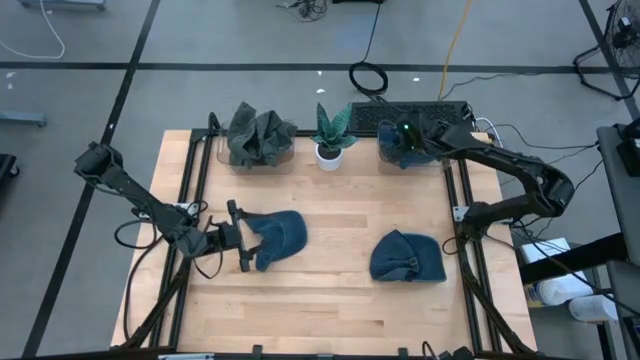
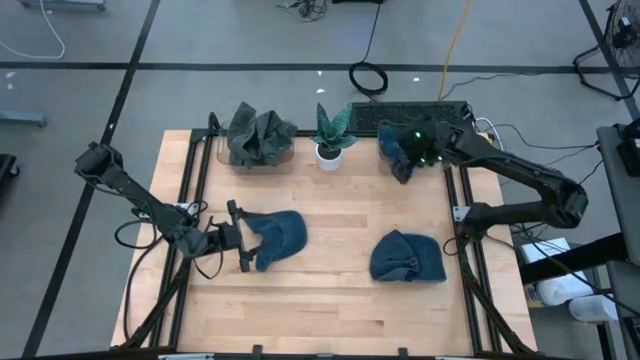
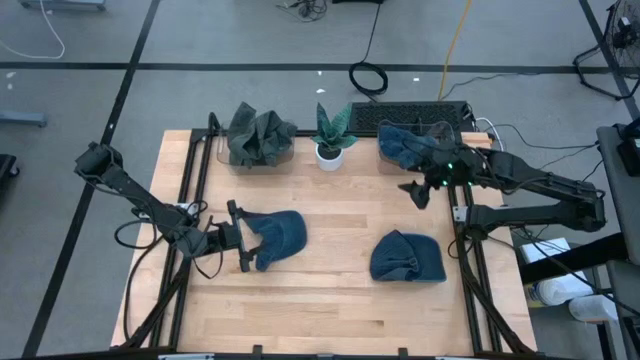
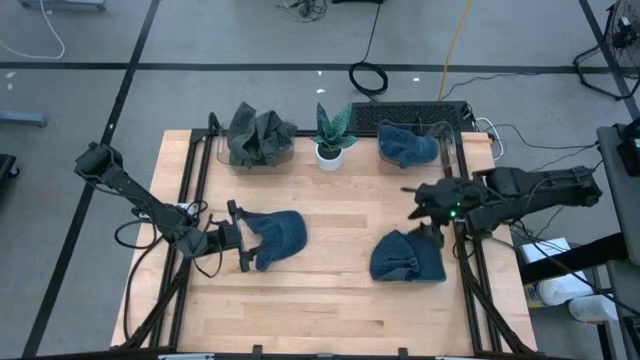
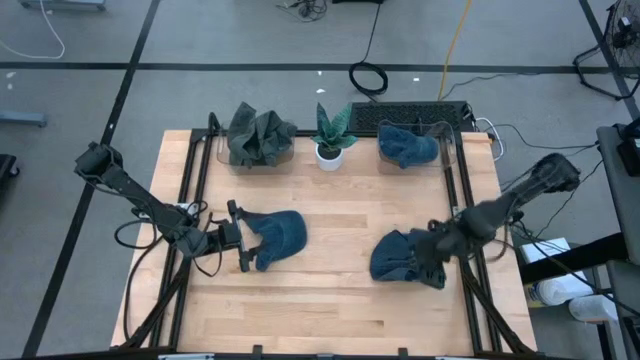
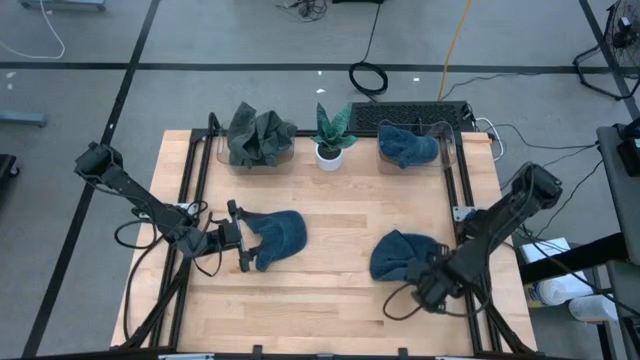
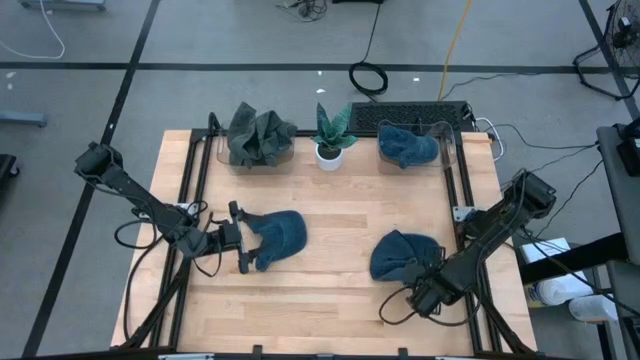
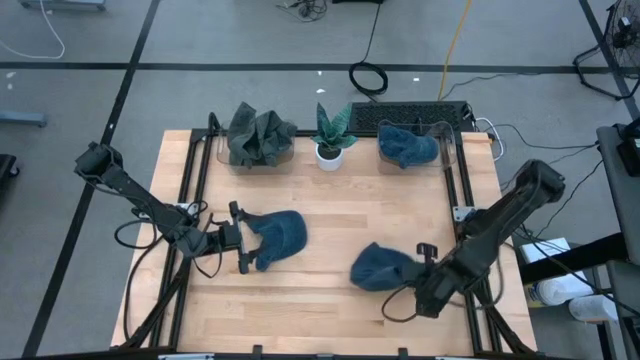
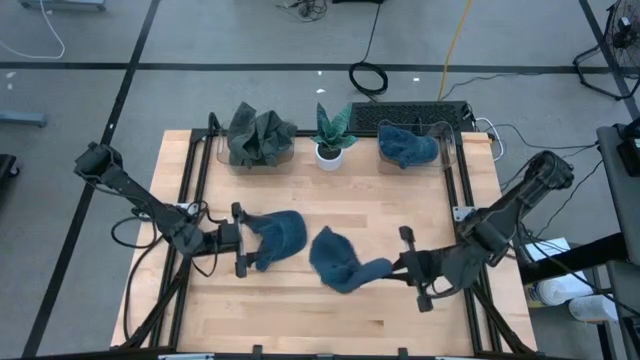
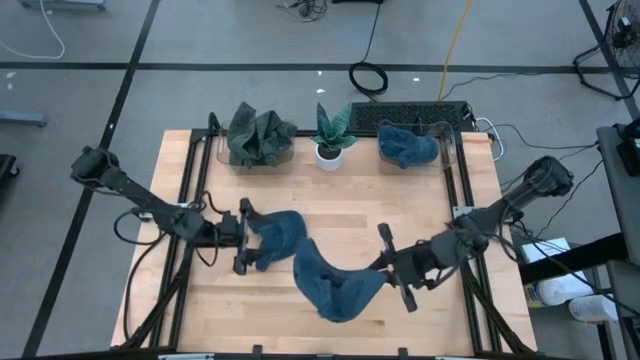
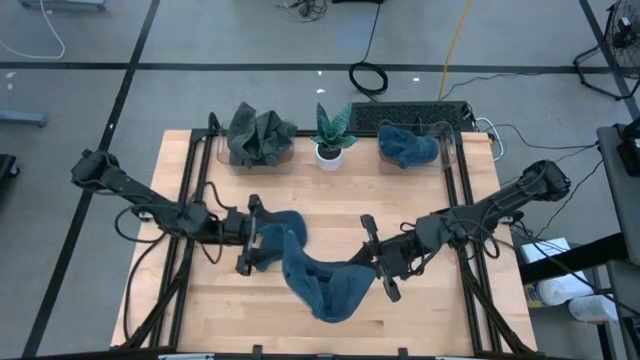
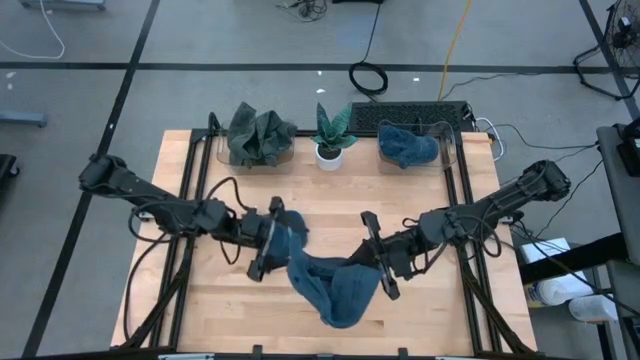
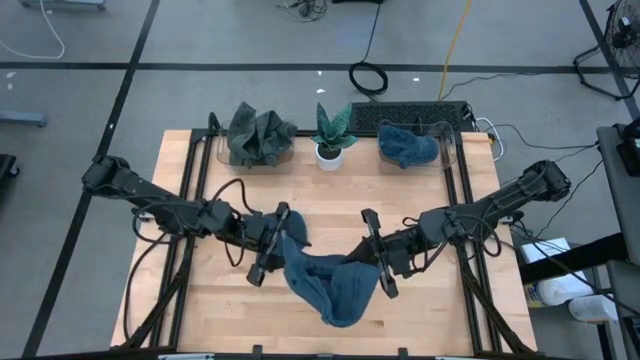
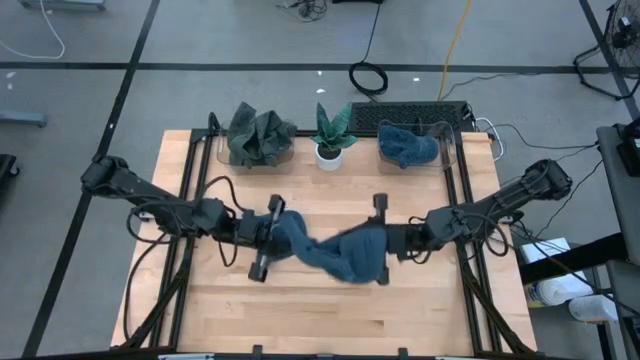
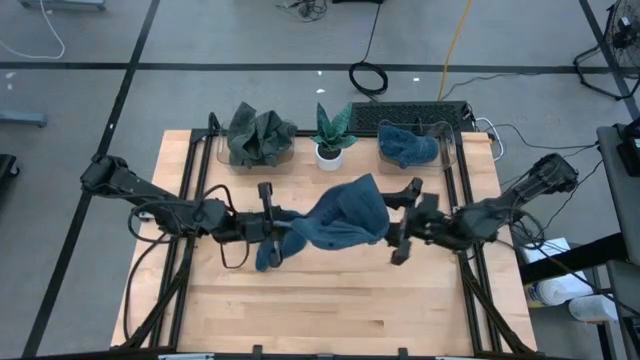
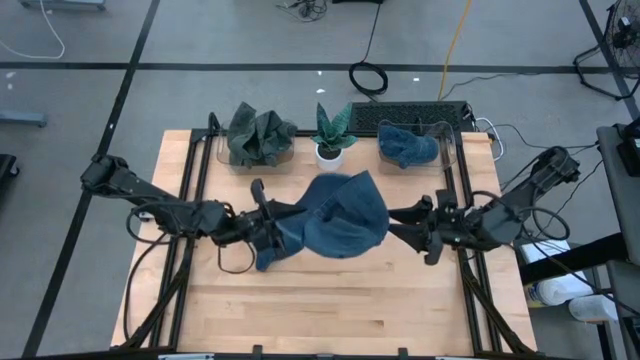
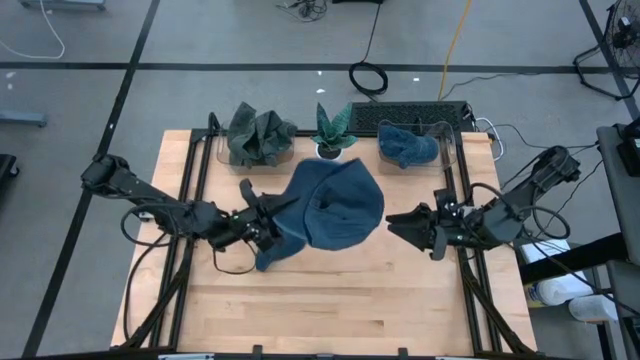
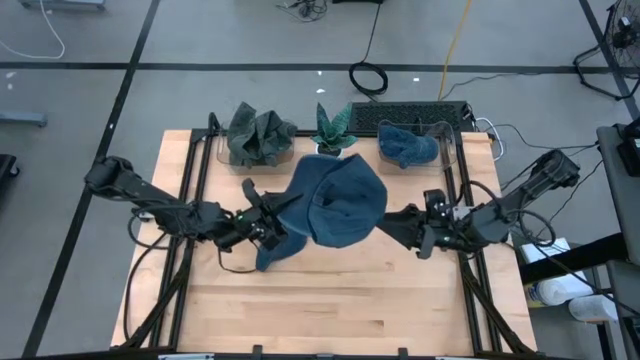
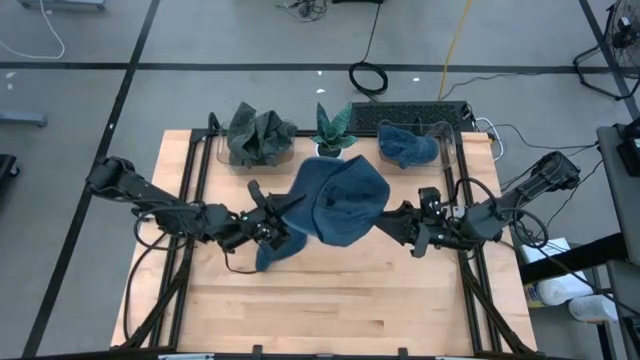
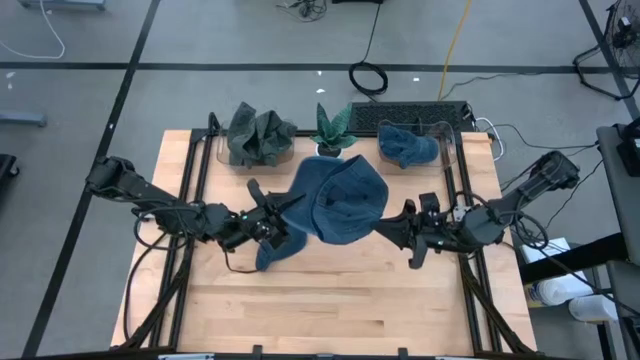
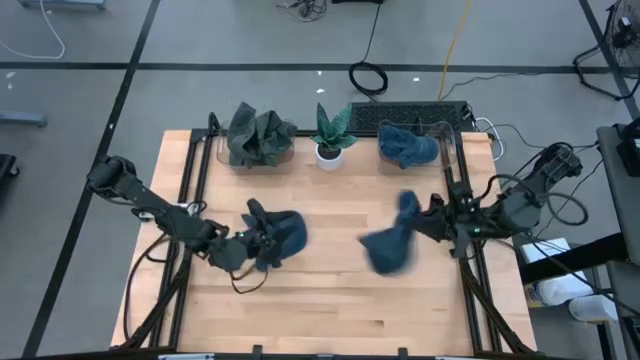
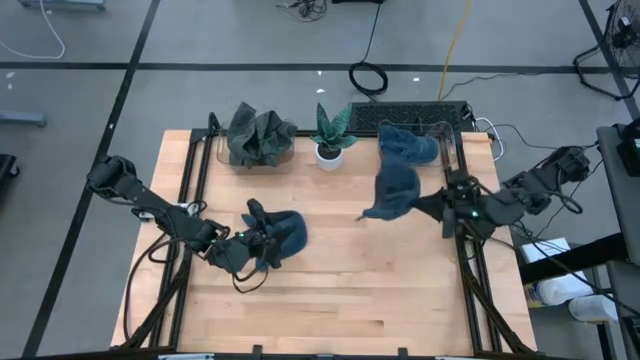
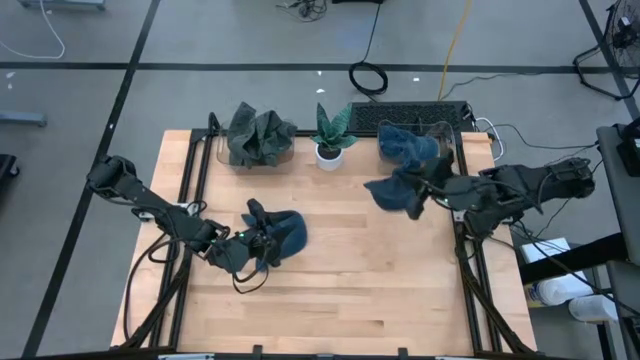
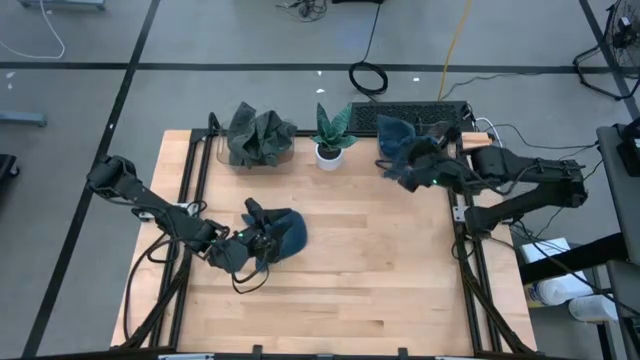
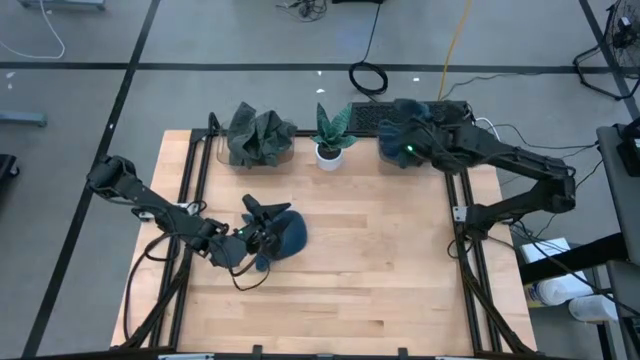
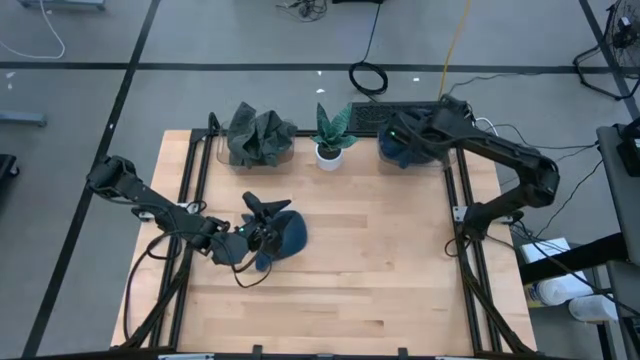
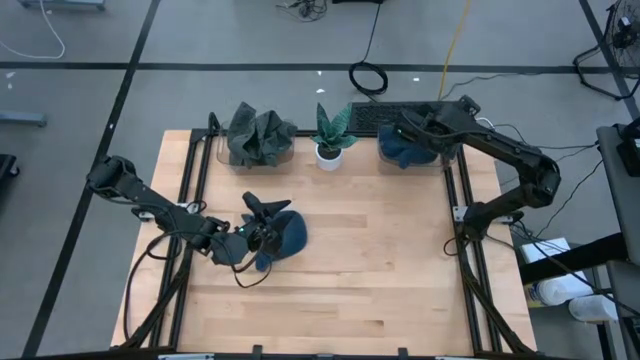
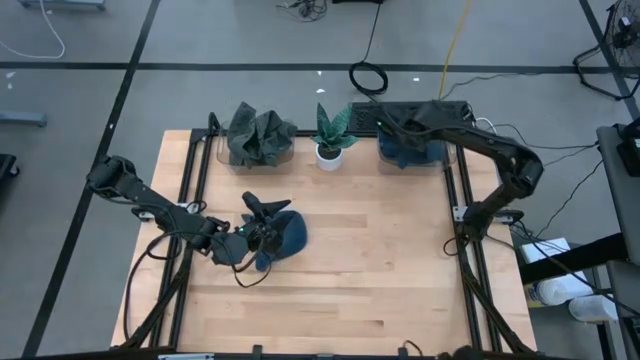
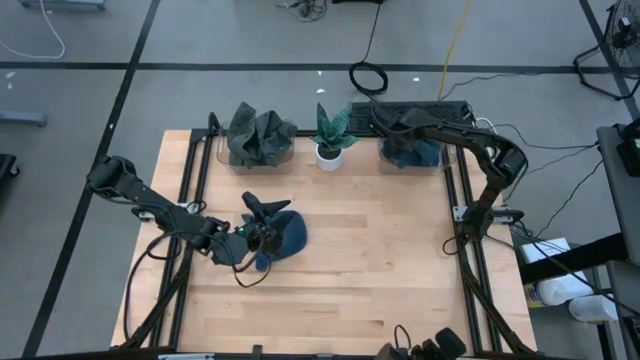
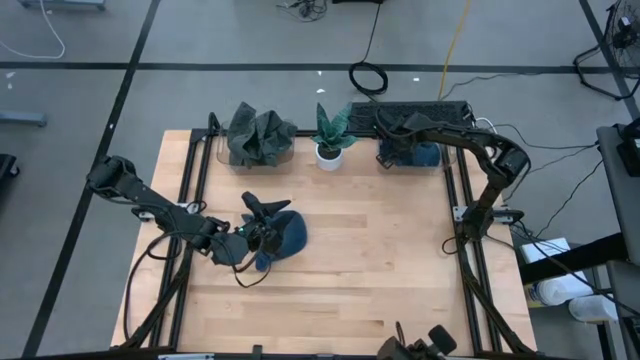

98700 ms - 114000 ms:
Task: Pick & Place hat
Put the right blue cap into the right transparent bin

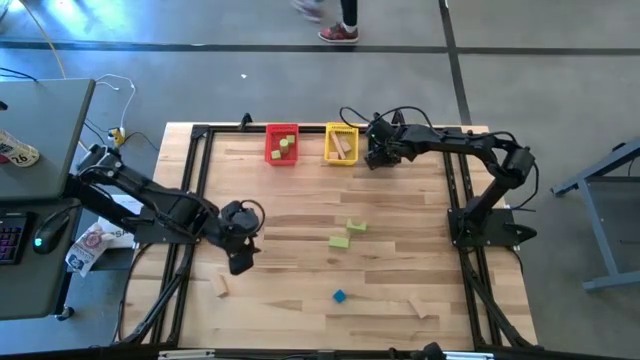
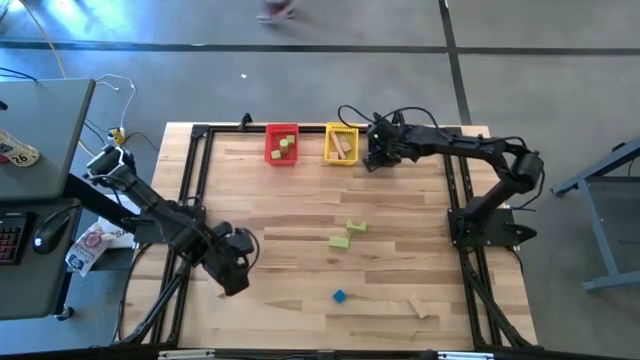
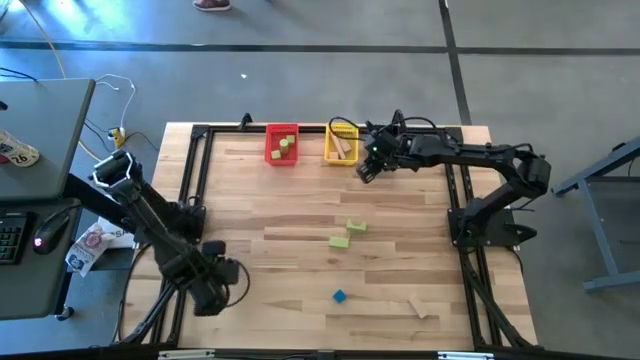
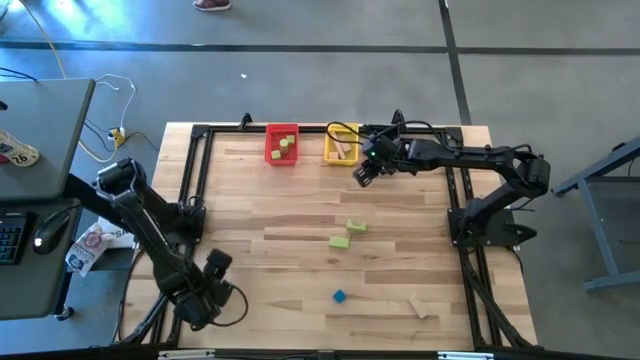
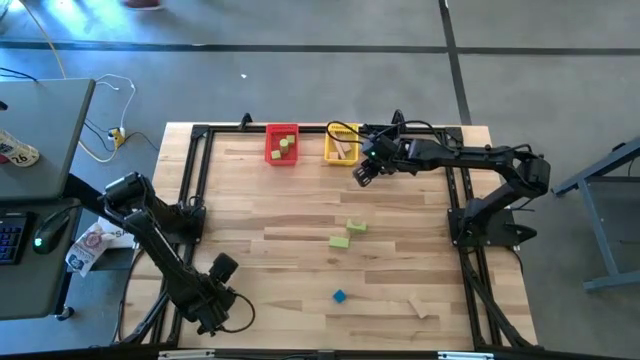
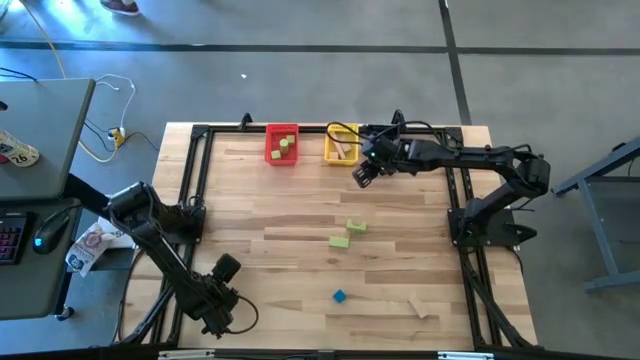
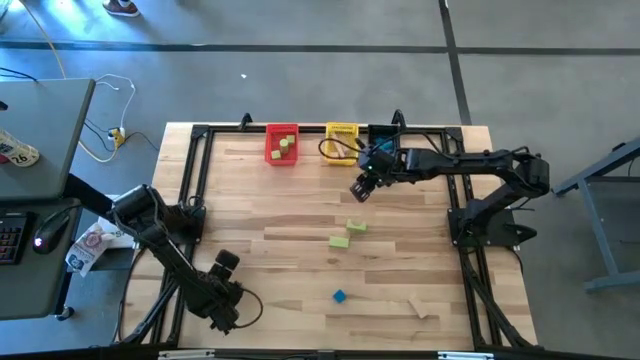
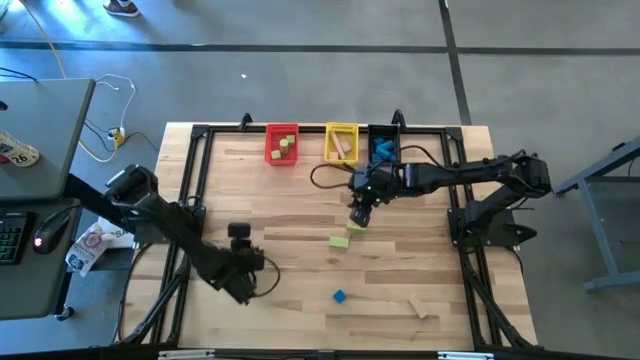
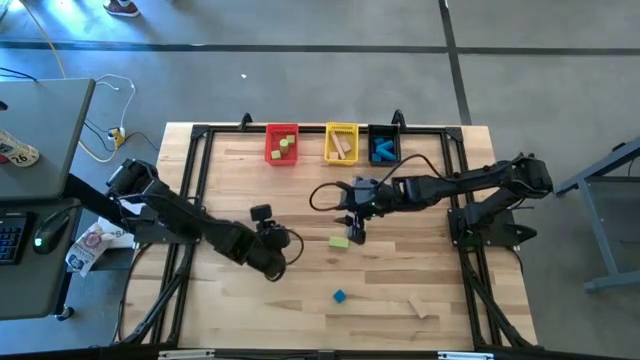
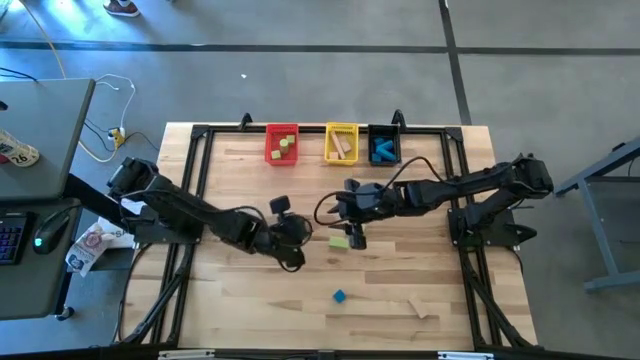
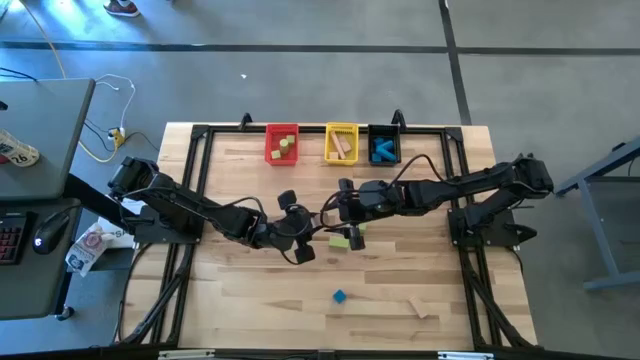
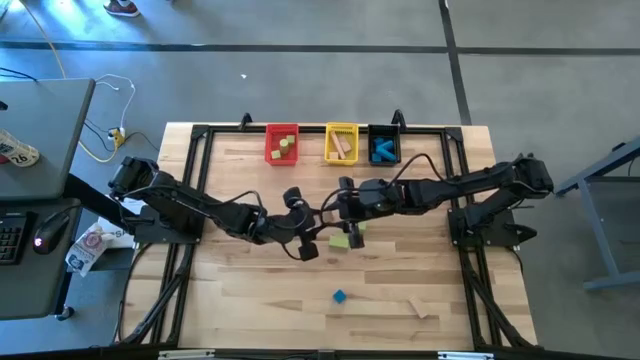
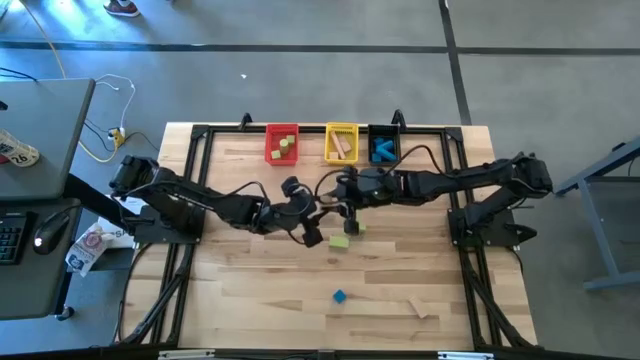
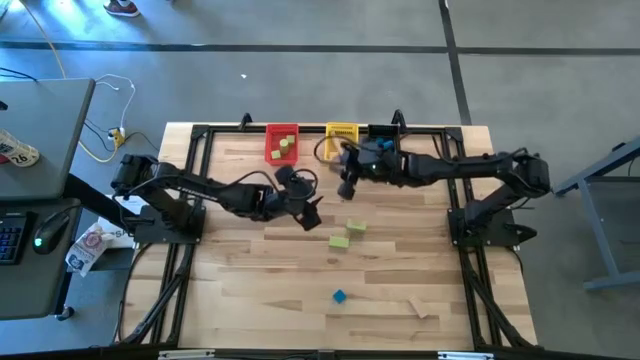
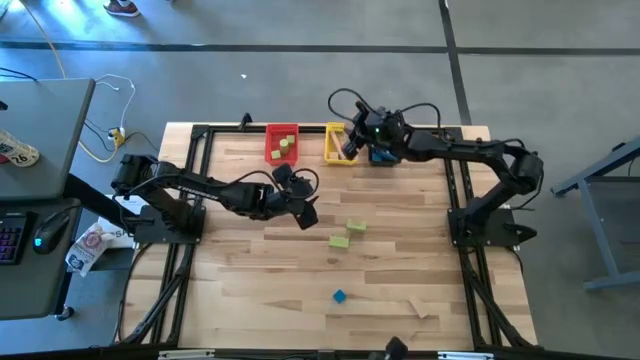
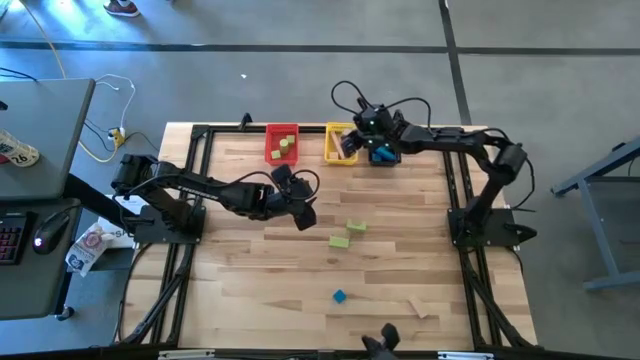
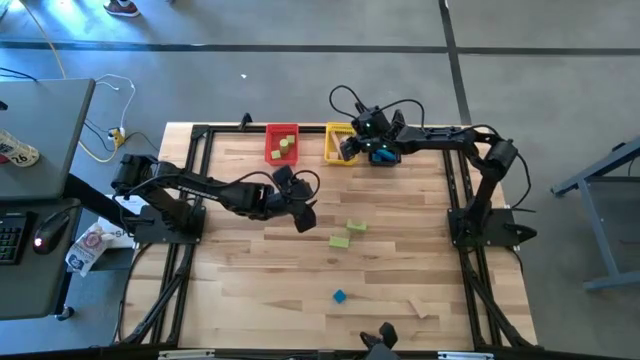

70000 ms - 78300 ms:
Task: Sort & place blocks by color
Put the beige block into the yellow bin
